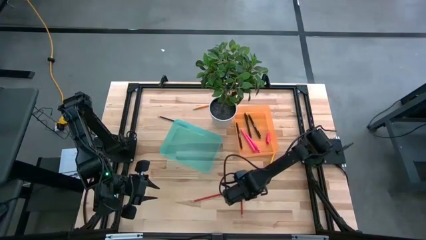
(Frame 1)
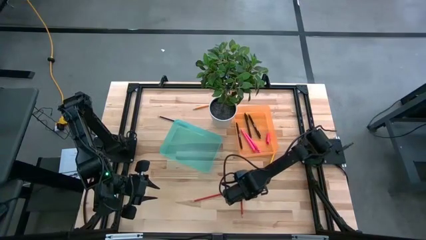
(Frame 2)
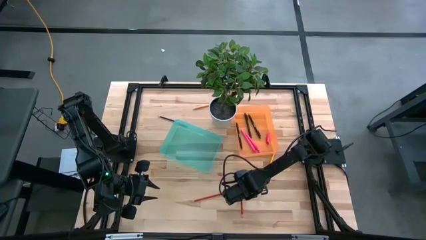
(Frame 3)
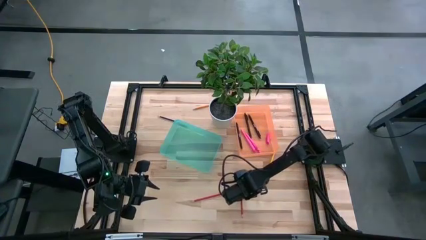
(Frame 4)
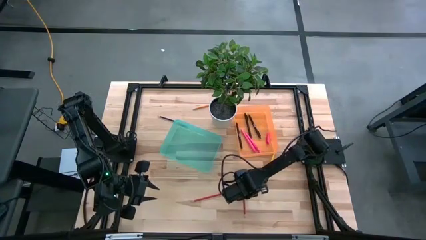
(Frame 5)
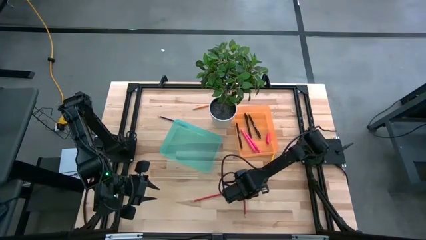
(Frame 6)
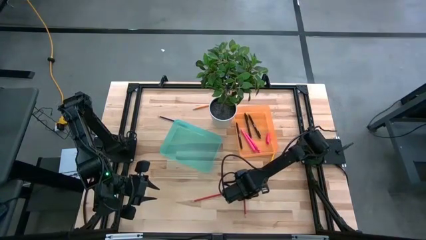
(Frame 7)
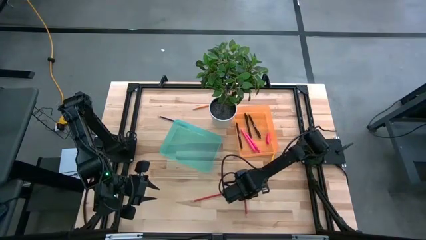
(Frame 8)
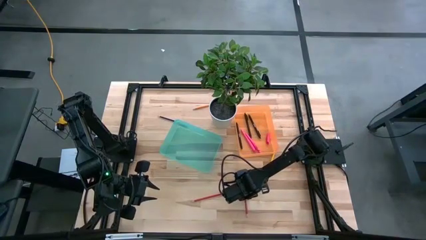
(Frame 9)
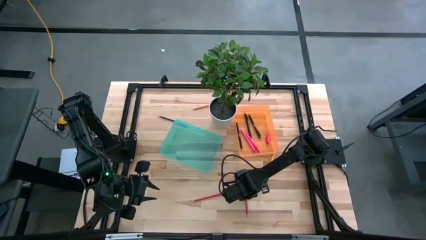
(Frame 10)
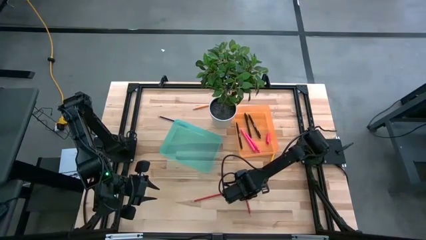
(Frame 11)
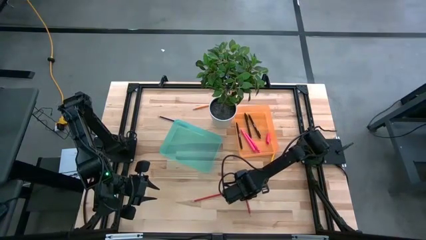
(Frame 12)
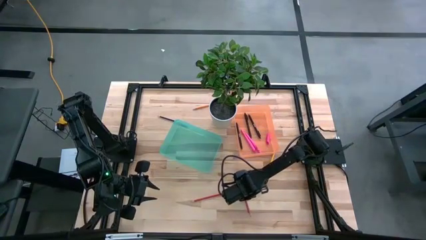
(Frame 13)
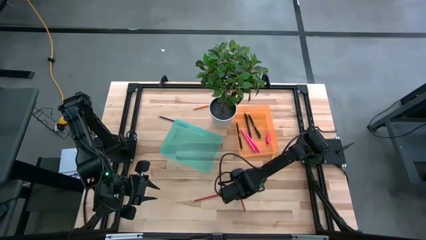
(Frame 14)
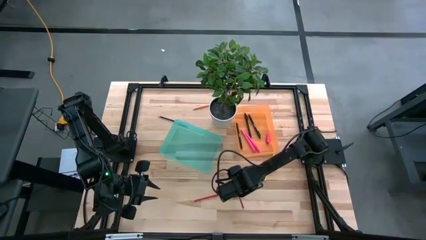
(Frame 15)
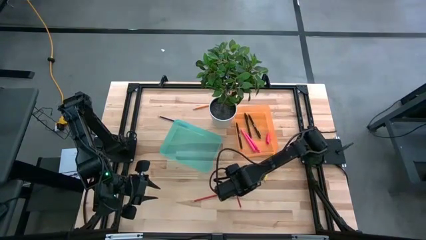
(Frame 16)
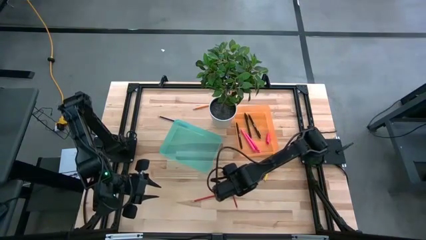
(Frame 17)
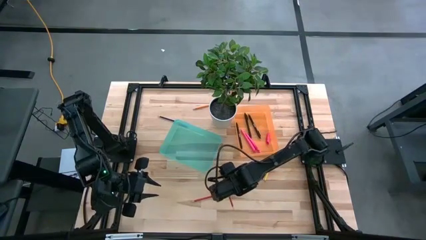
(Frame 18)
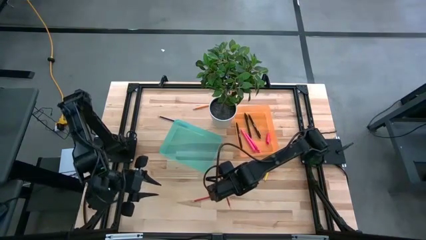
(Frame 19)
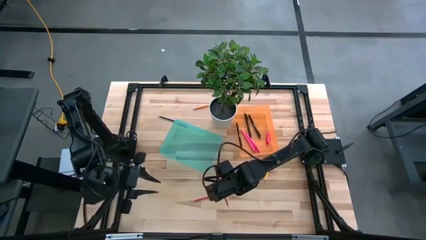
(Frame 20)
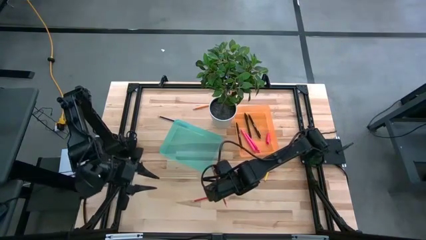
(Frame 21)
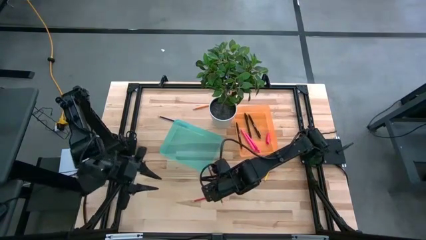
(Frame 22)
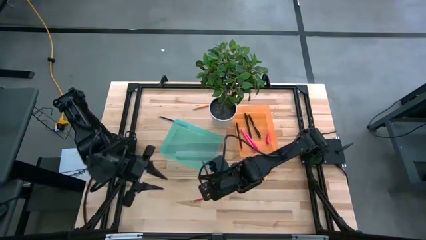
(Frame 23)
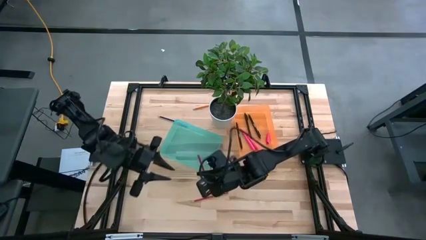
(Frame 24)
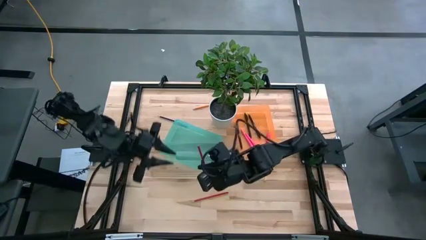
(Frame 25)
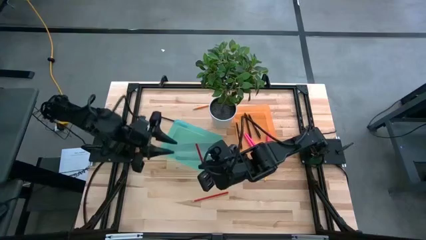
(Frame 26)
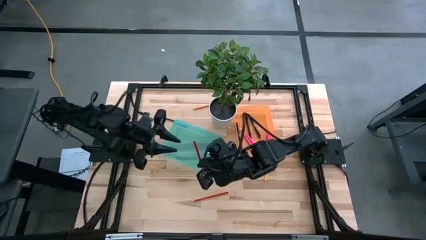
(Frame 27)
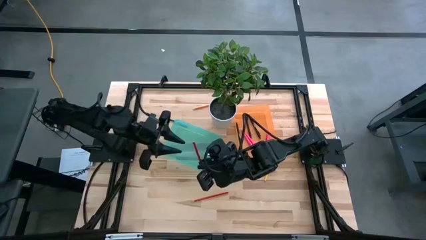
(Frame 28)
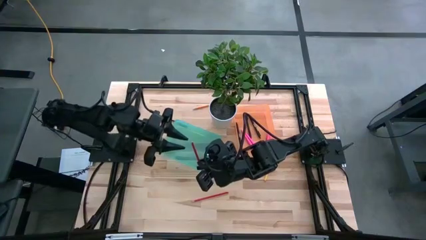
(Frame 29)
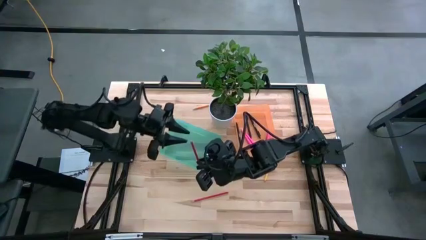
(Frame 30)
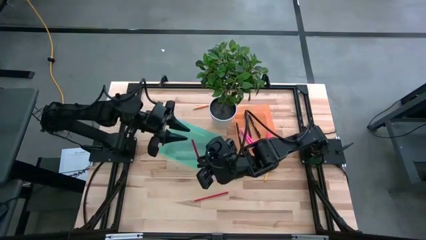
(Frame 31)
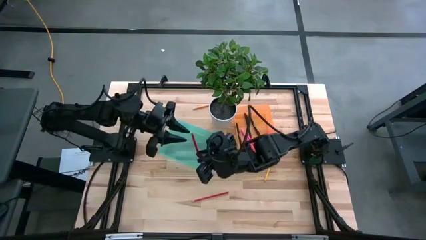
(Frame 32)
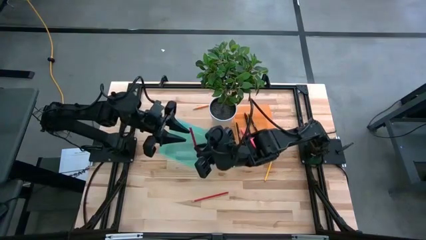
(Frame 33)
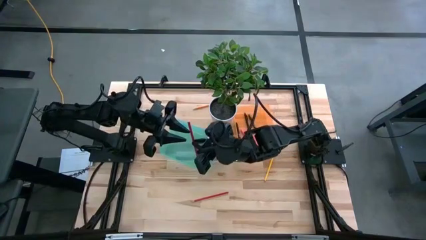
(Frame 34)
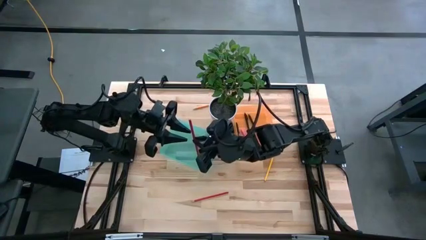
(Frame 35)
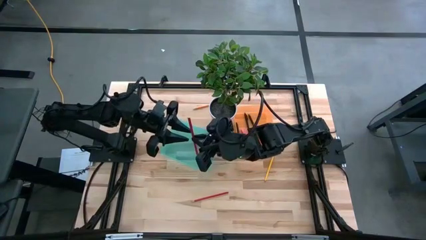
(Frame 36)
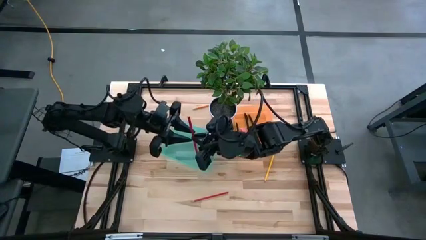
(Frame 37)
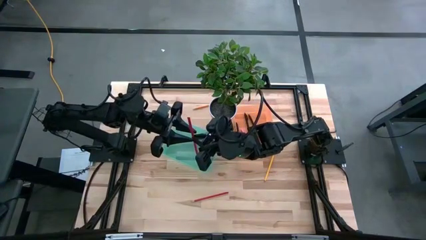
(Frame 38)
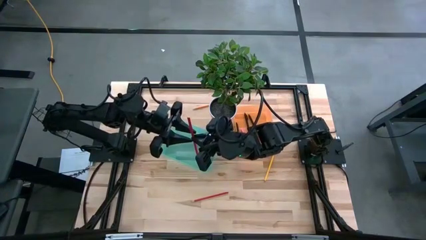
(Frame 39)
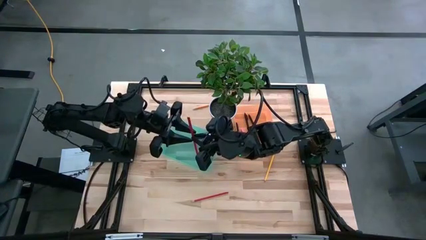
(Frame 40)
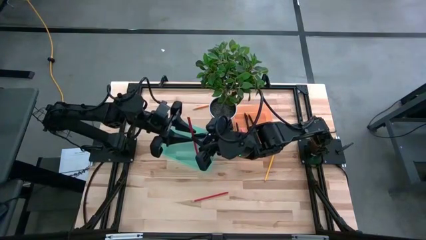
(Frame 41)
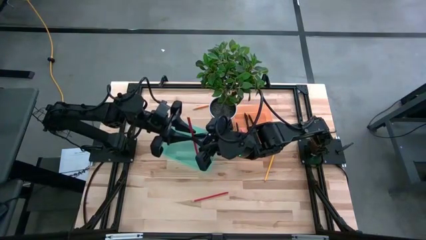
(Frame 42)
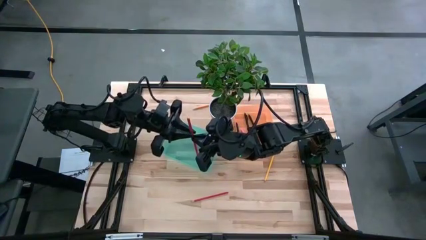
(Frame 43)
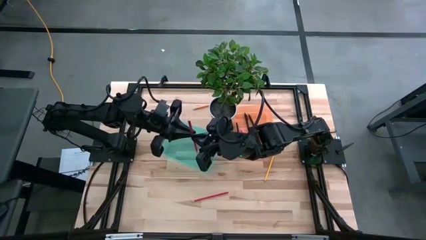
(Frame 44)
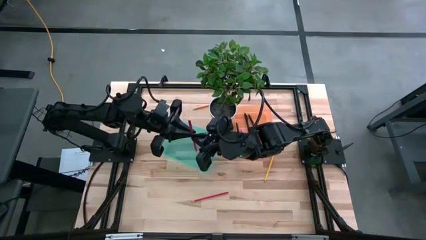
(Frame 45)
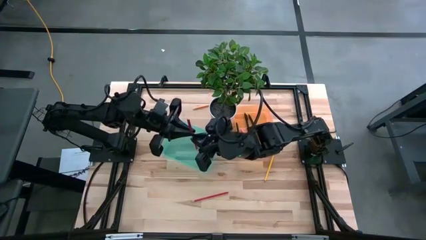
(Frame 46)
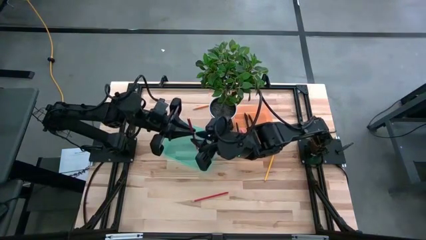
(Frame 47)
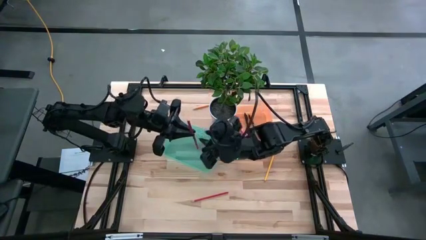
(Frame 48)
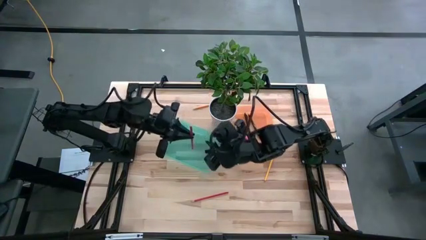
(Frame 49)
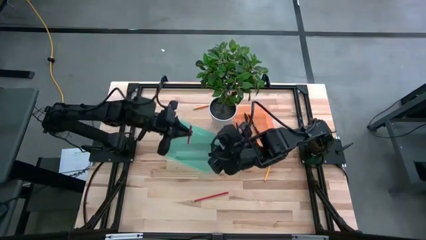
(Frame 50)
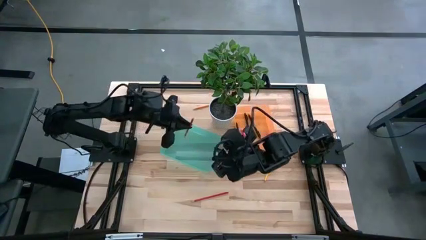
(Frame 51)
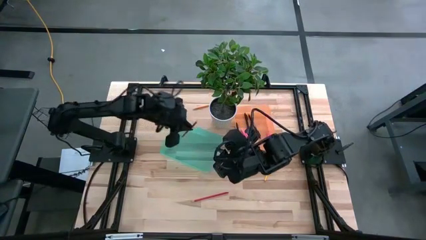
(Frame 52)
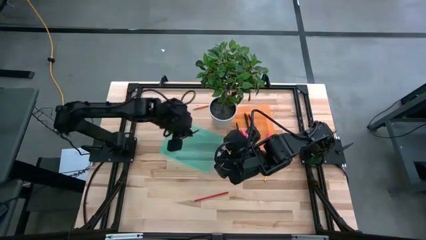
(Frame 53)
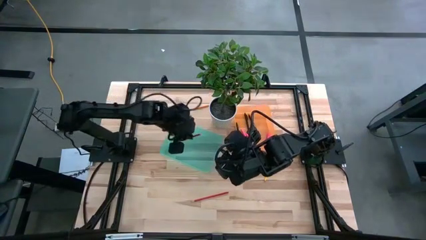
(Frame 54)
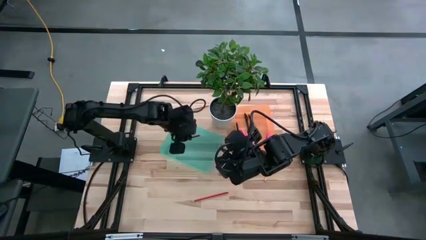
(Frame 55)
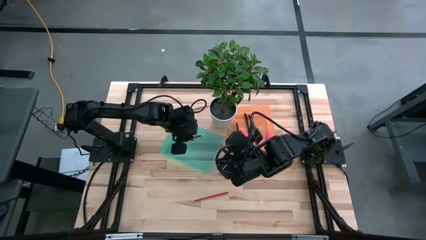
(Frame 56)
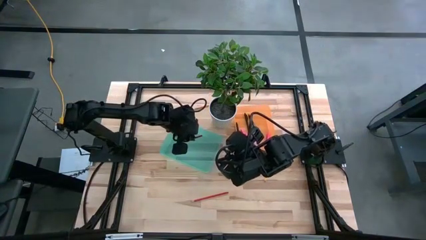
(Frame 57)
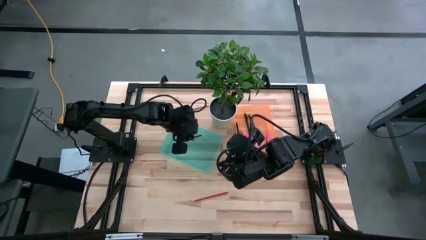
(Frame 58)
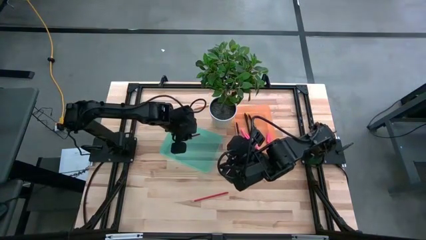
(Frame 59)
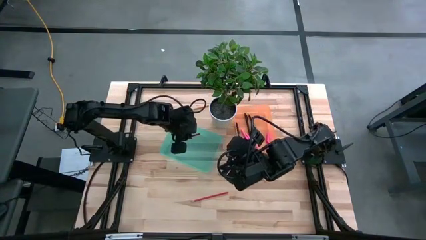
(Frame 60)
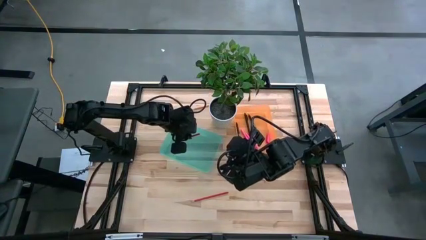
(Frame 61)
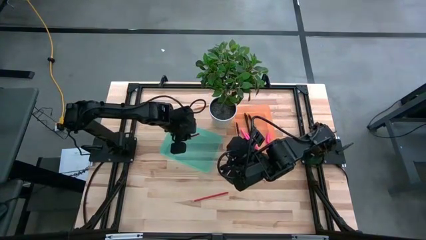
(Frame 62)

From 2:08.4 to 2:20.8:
Task: Sort pens & pencils
Put the right red pencil into the blue bin
